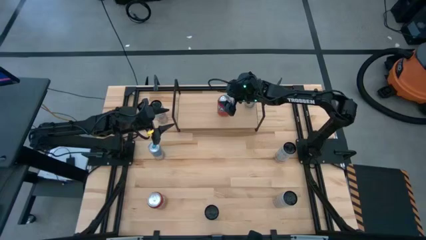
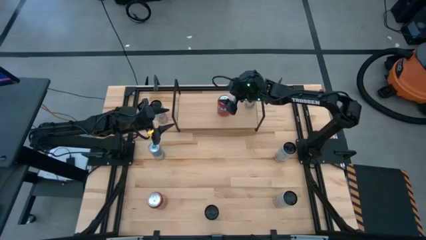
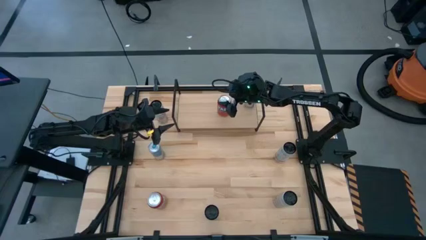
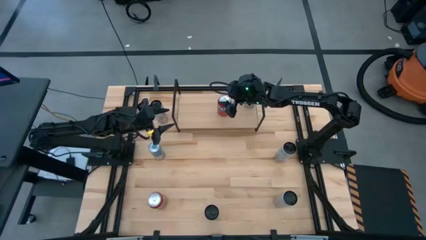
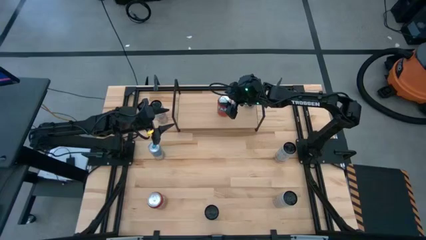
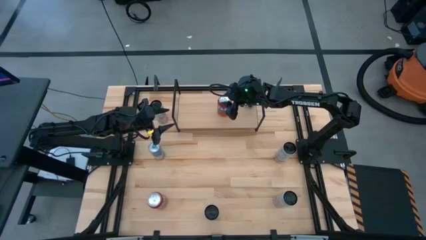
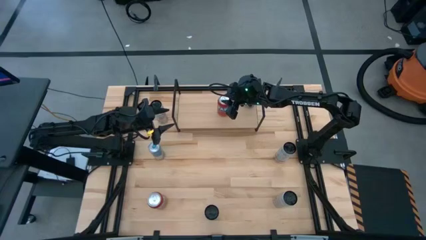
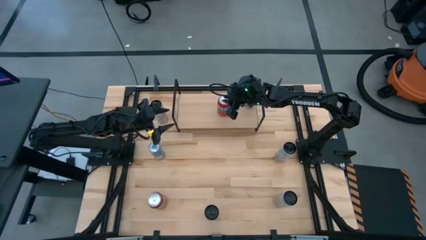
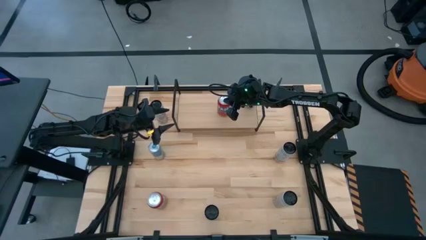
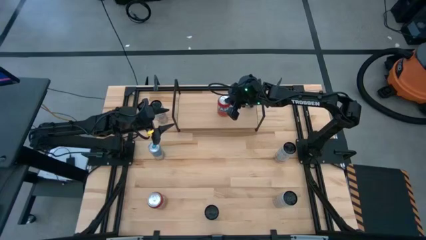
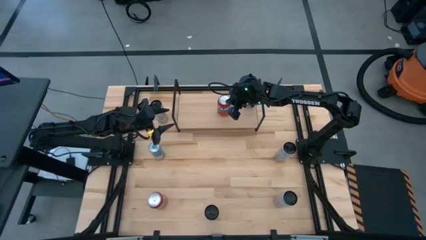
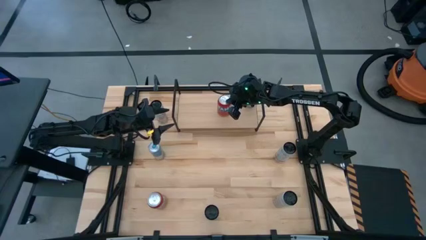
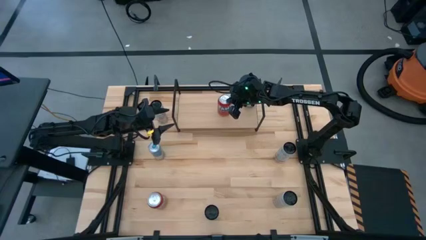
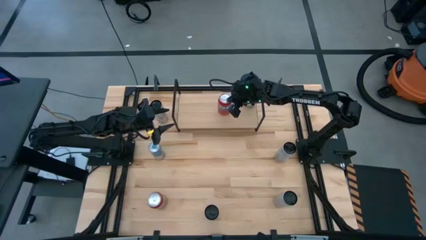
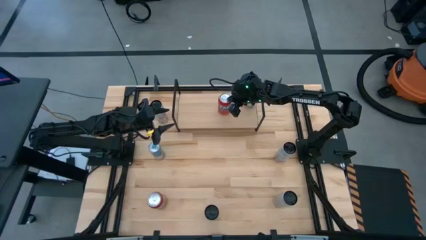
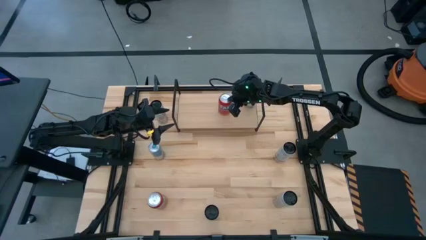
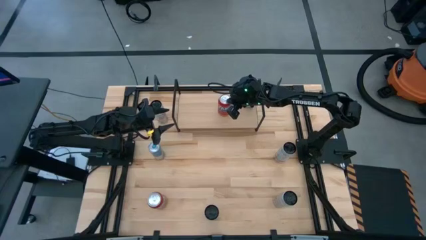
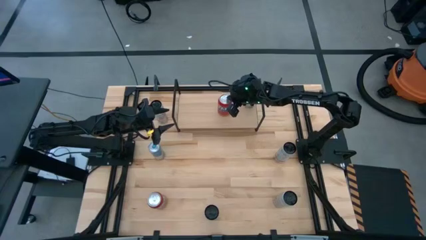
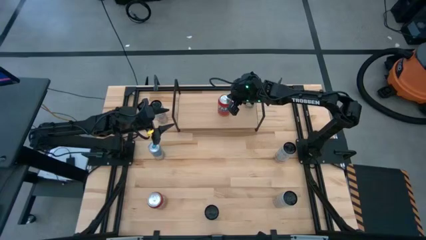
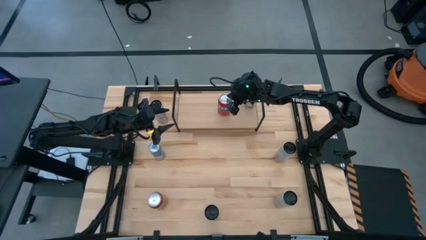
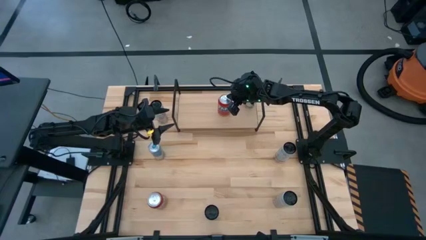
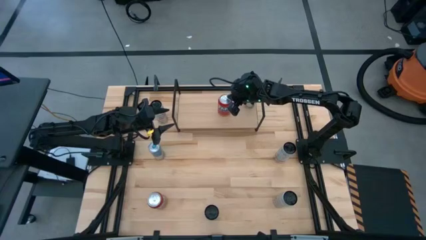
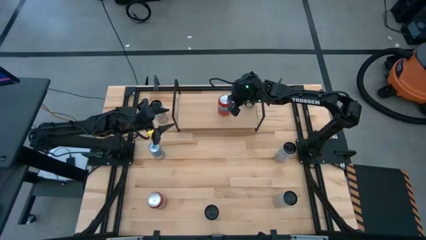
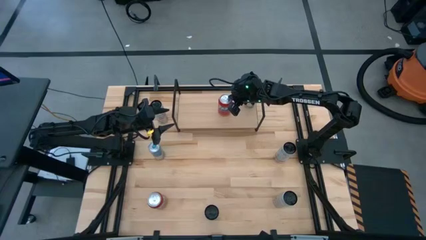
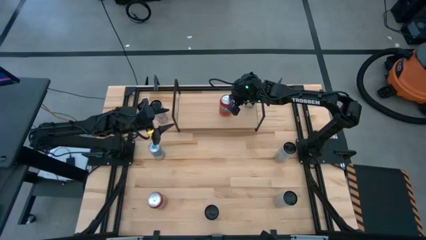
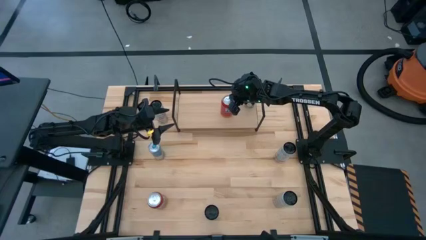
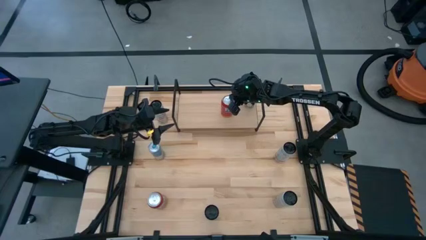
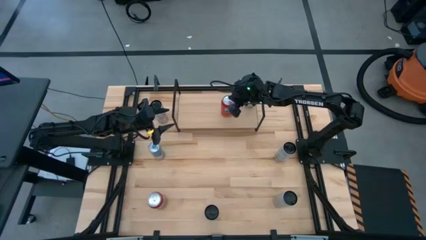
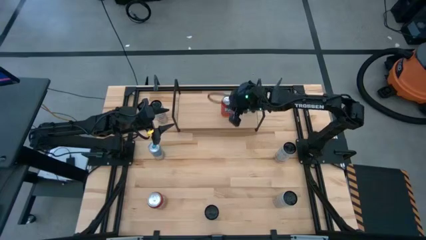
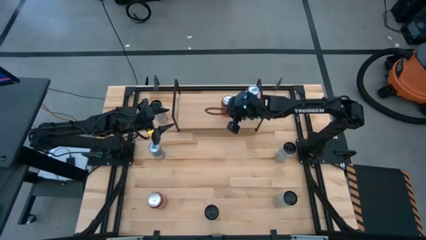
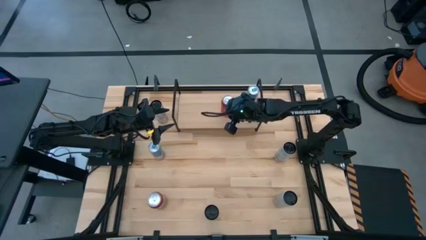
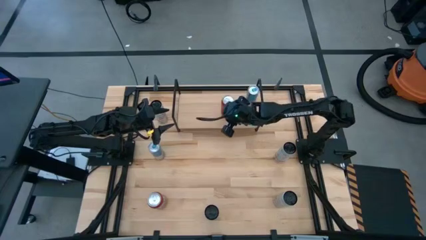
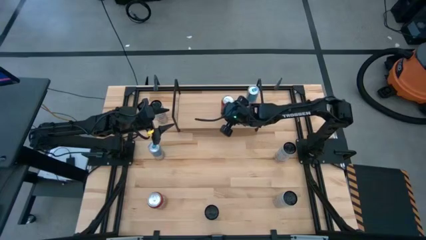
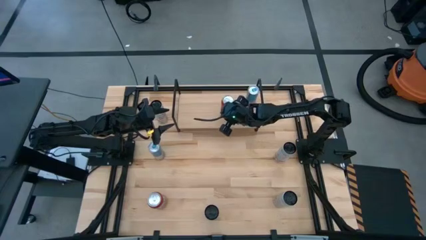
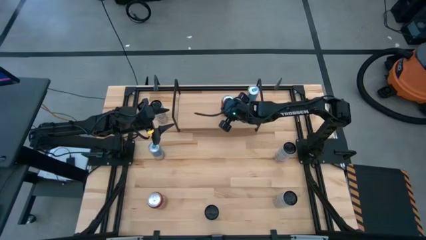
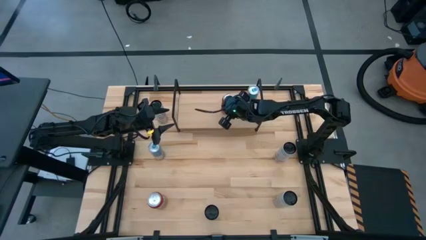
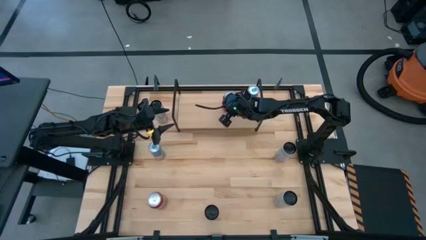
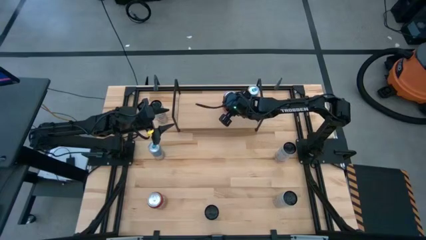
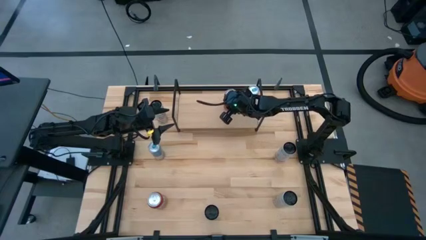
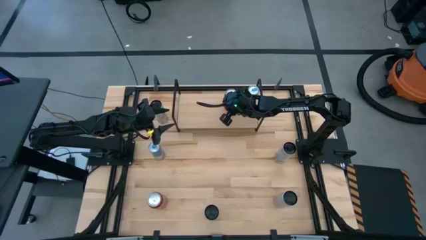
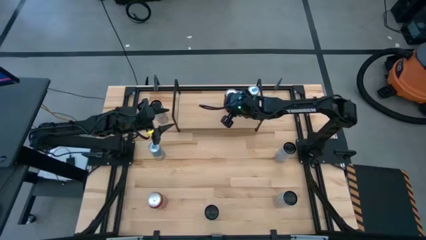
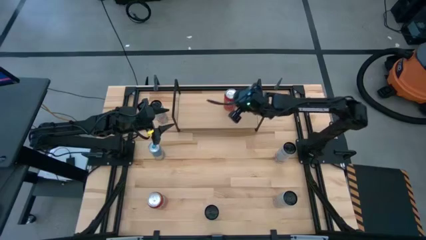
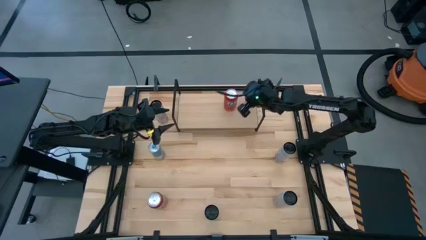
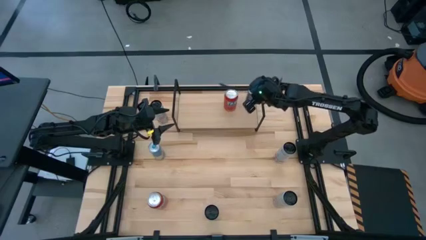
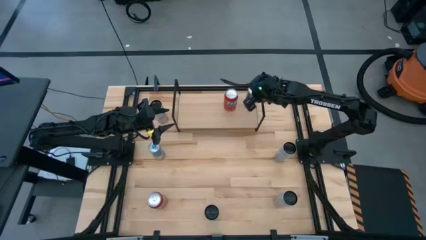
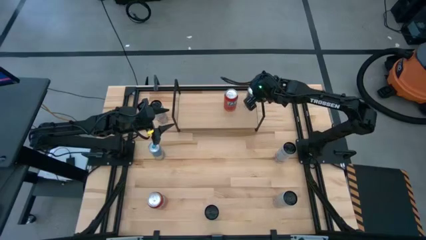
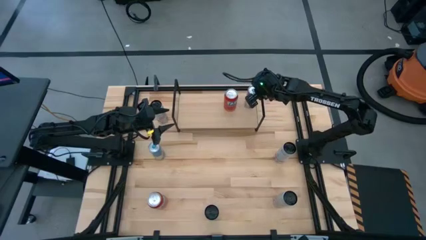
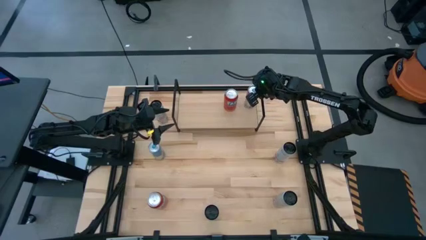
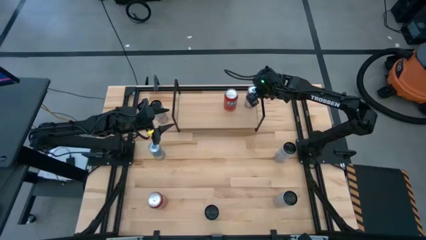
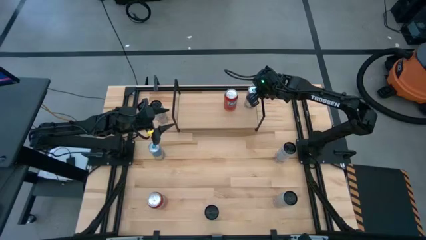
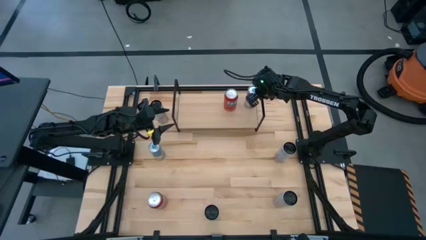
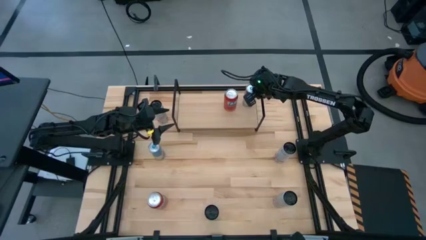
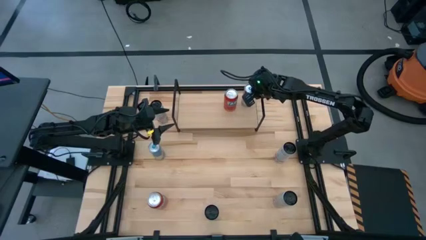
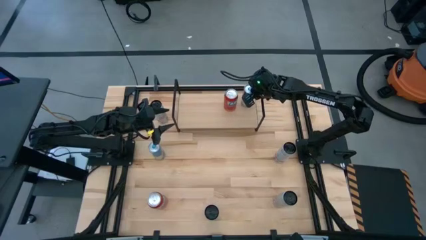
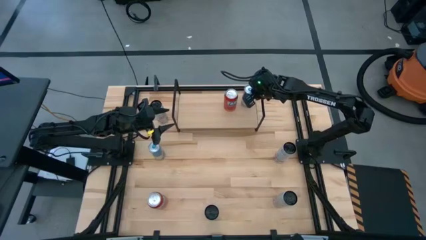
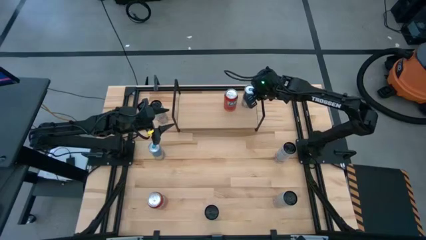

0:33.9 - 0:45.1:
Task: Place canned beverage on shelf
Put the top orange soda can on the shelf
